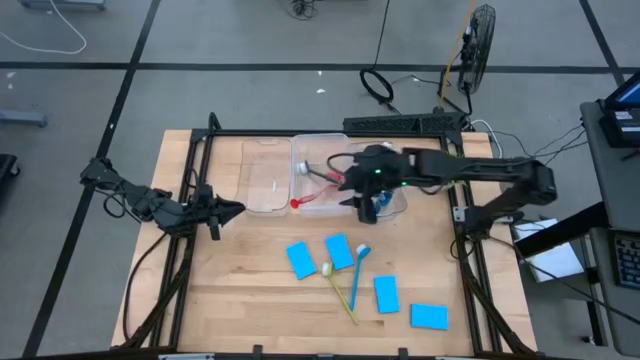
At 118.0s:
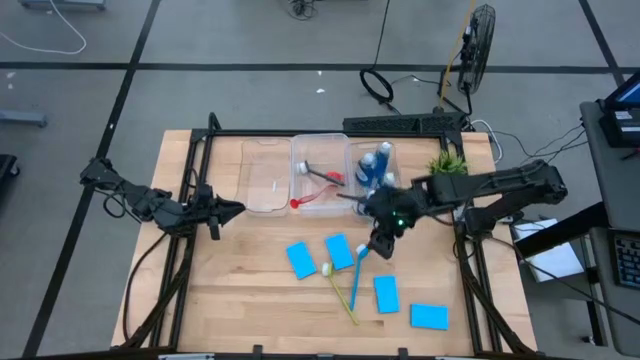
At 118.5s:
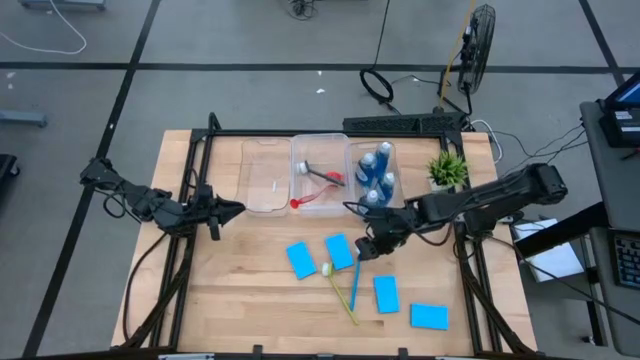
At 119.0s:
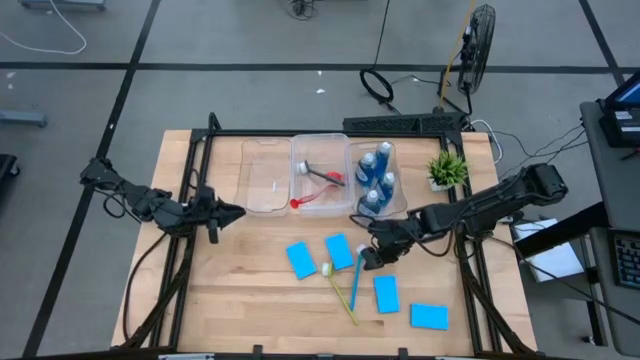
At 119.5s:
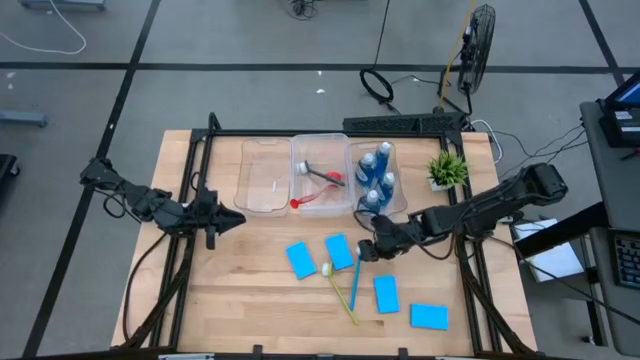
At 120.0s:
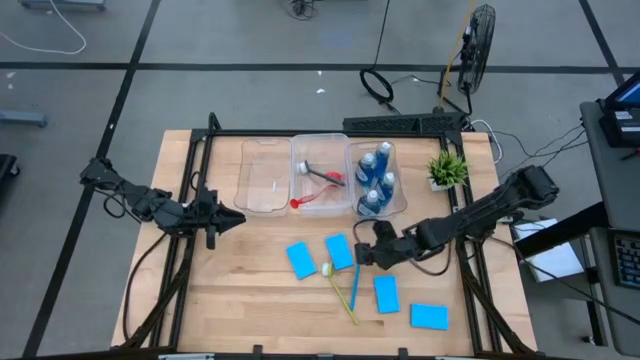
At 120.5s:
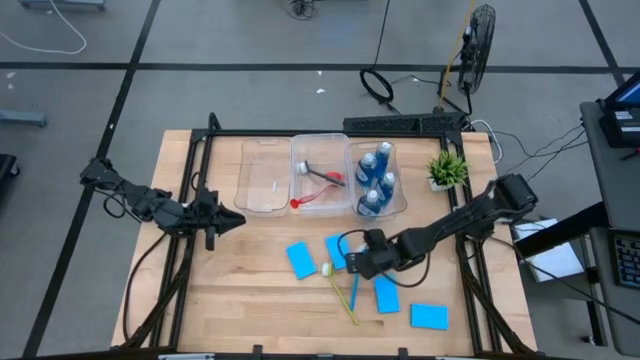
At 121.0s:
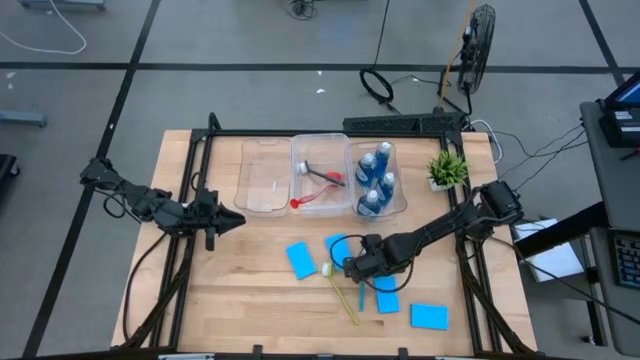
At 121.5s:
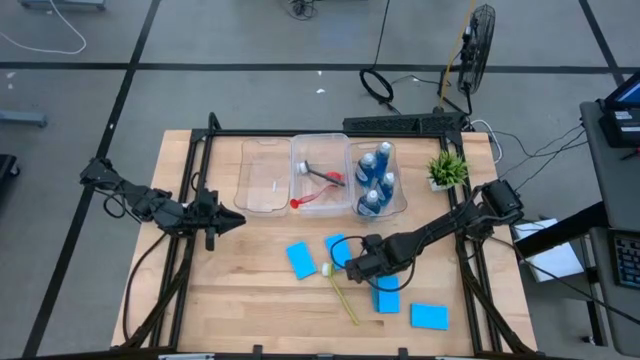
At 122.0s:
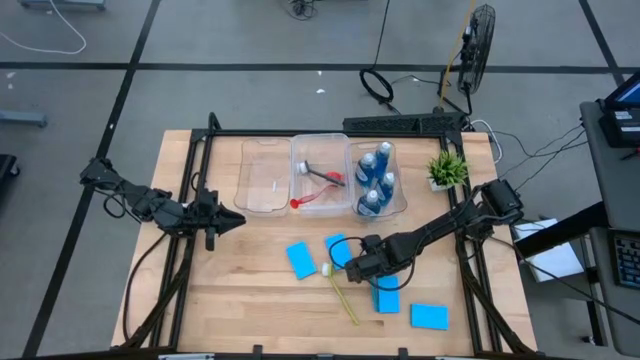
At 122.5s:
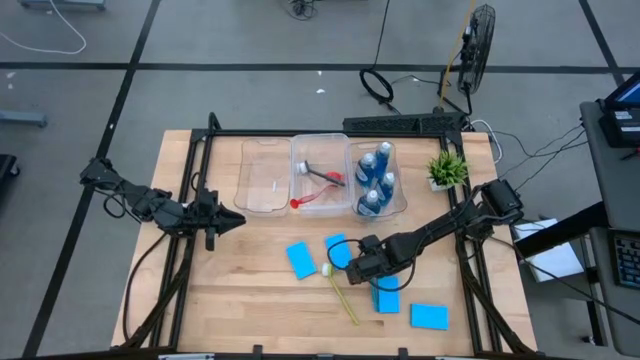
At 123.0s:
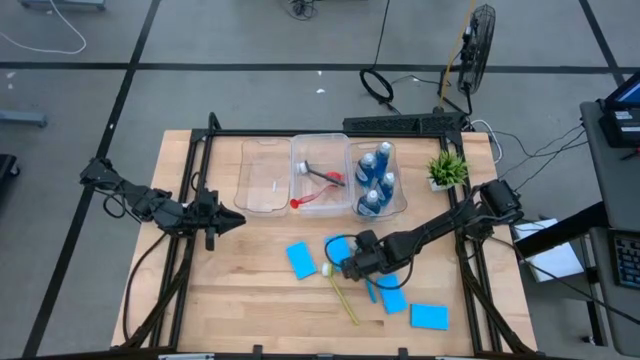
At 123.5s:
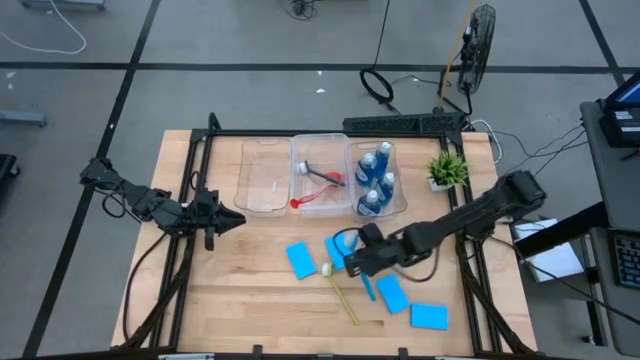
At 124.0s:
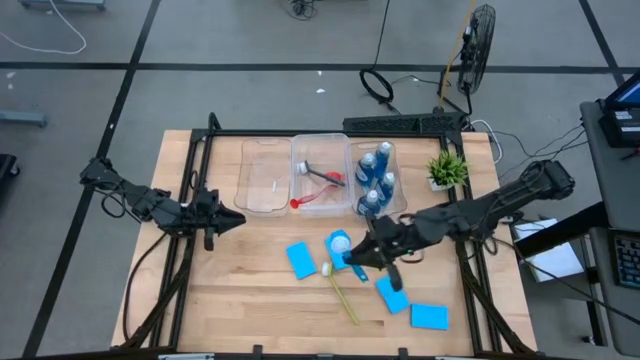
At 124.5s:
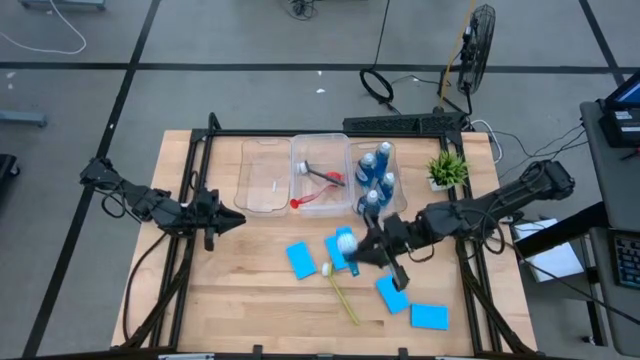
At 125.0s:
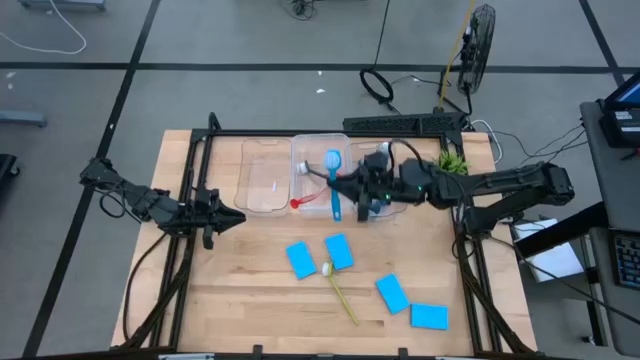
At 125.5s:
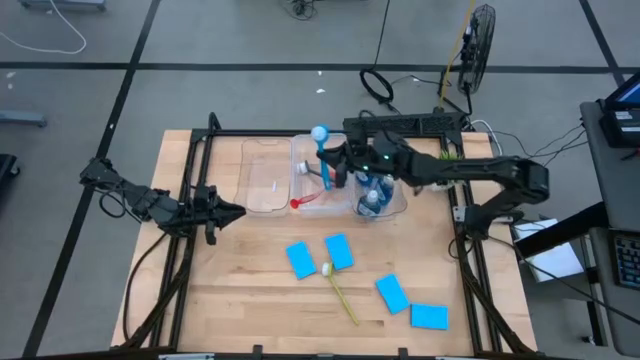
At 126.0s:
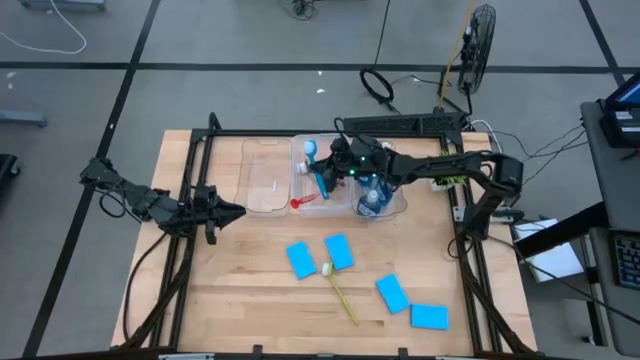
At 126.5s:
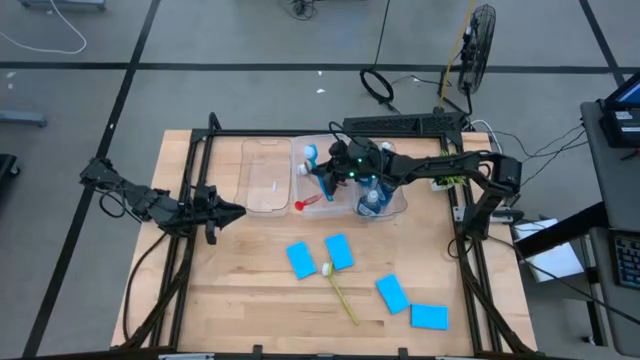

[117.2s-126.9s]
Task: Pick & Place Kitchen Sink Supplies
Put the blue dishwashing brush into the white bin

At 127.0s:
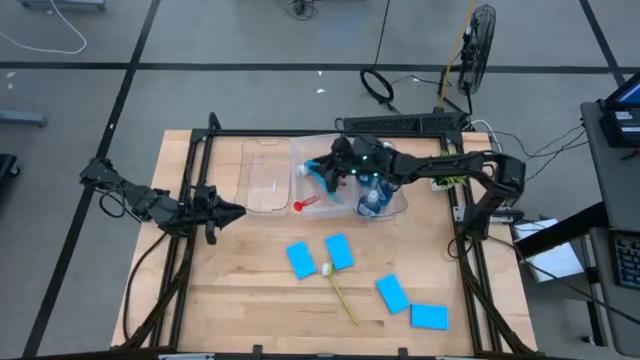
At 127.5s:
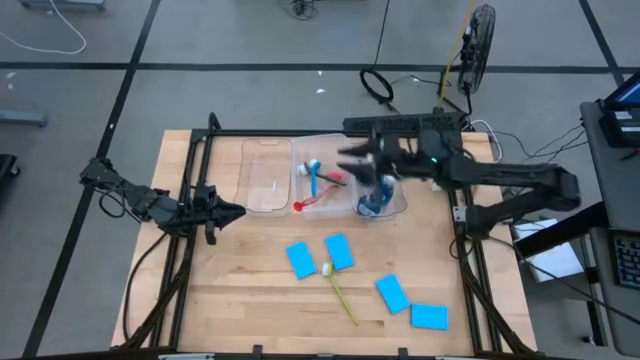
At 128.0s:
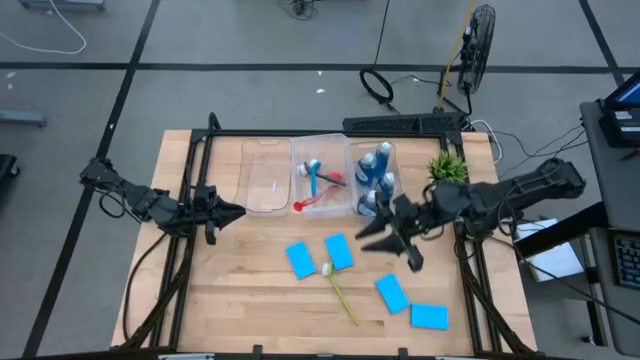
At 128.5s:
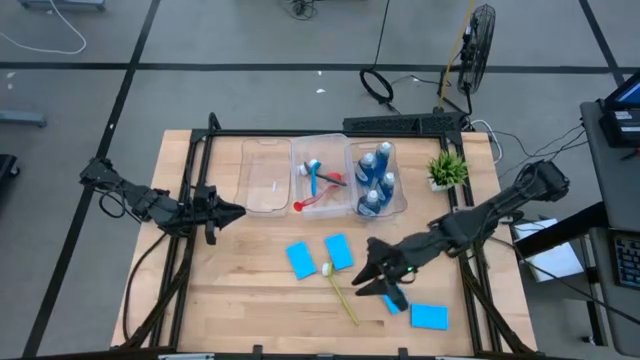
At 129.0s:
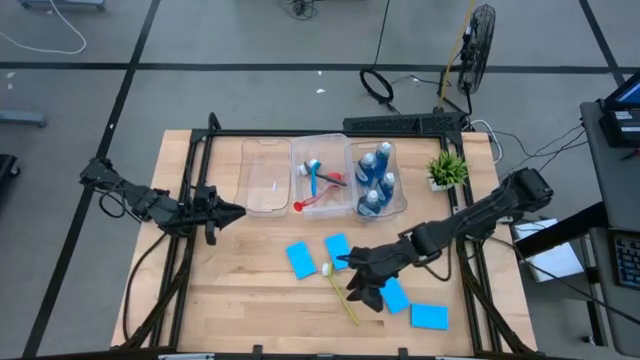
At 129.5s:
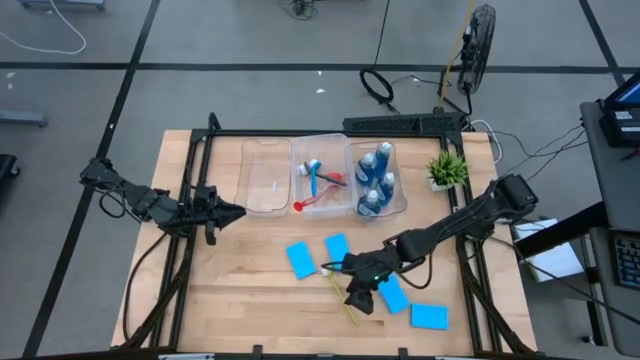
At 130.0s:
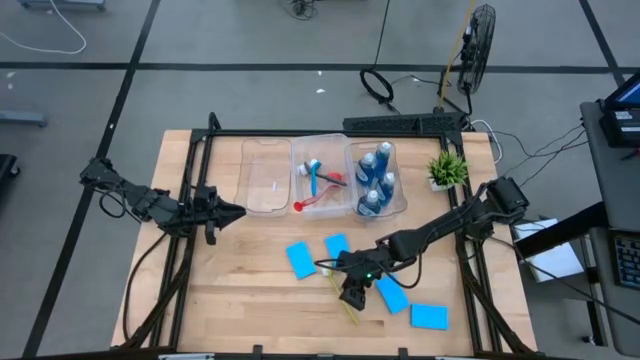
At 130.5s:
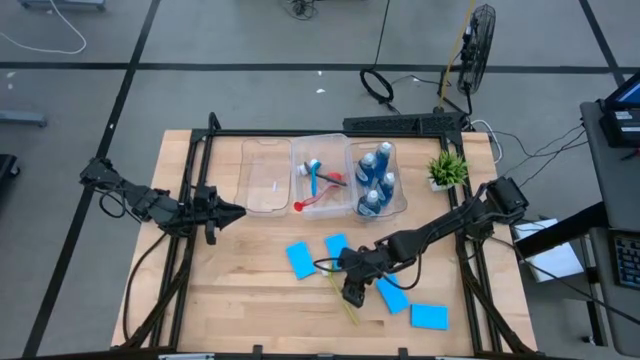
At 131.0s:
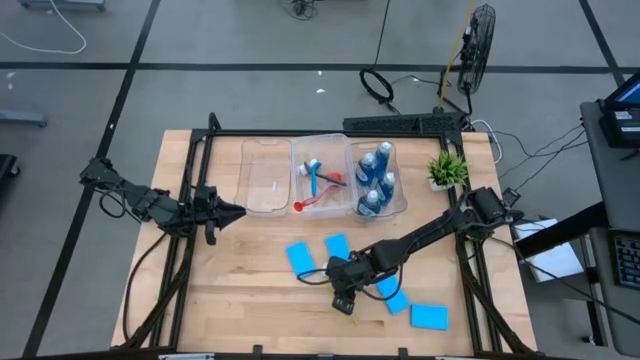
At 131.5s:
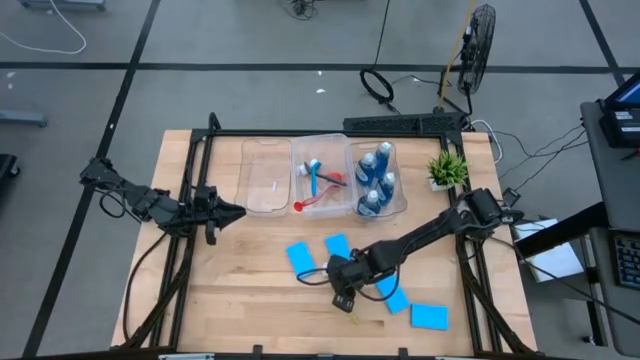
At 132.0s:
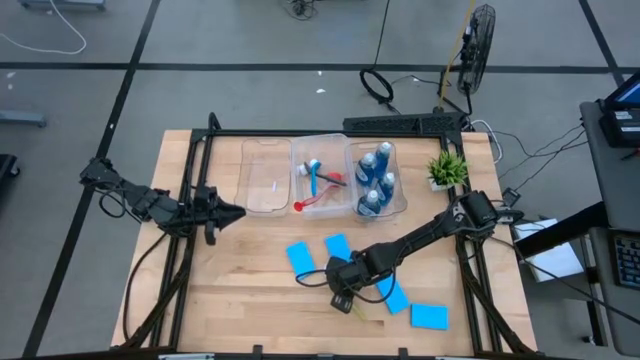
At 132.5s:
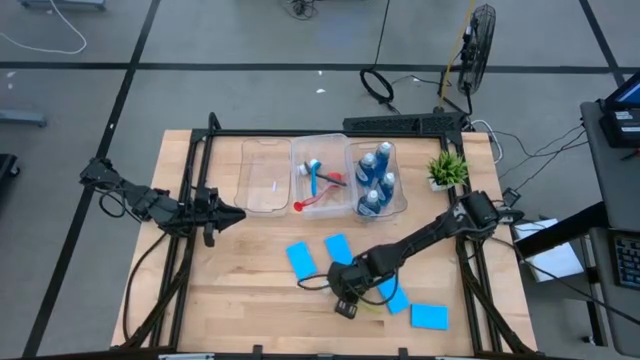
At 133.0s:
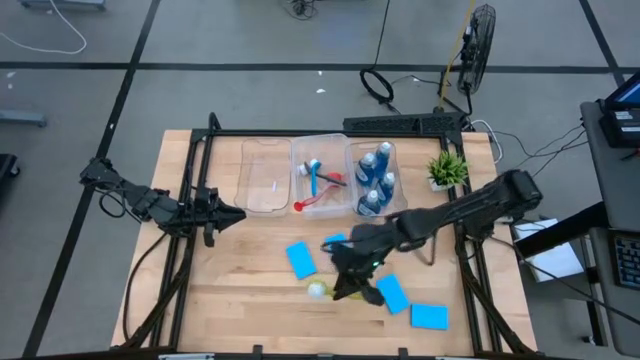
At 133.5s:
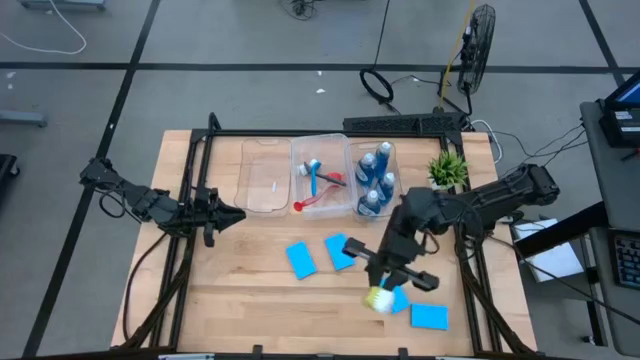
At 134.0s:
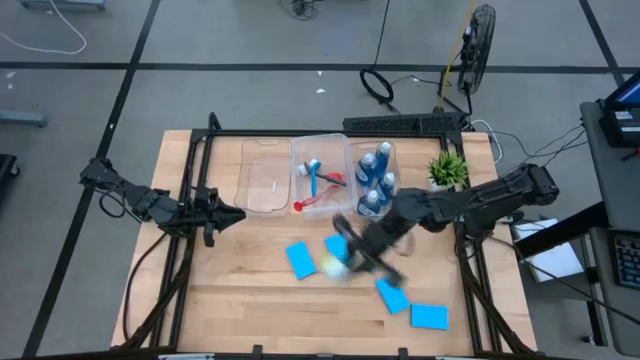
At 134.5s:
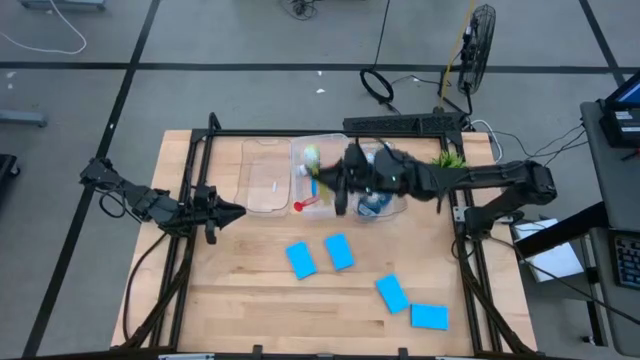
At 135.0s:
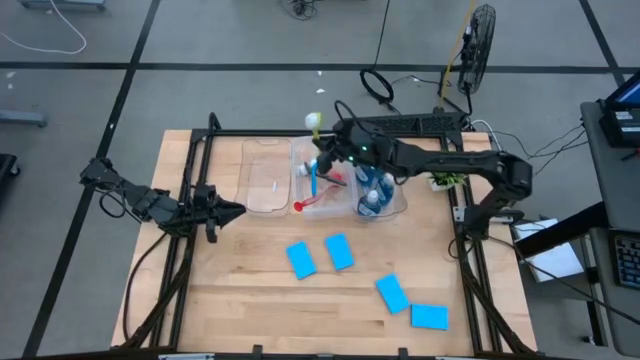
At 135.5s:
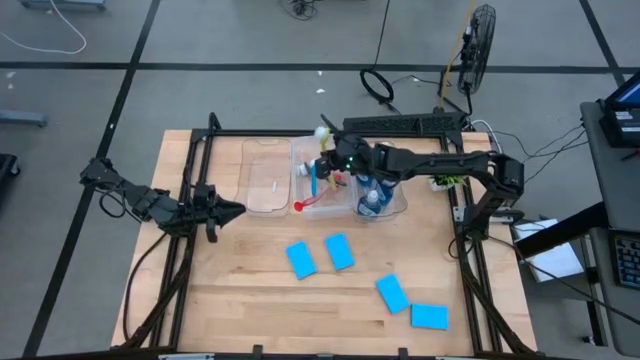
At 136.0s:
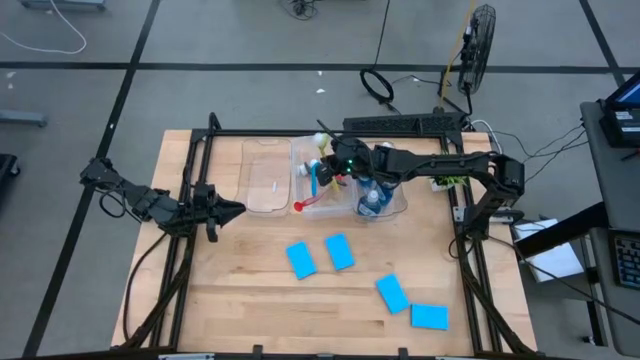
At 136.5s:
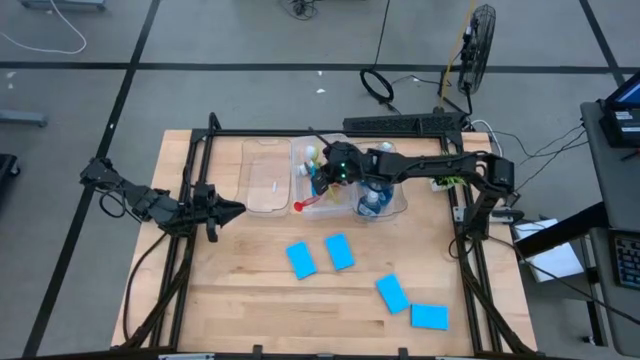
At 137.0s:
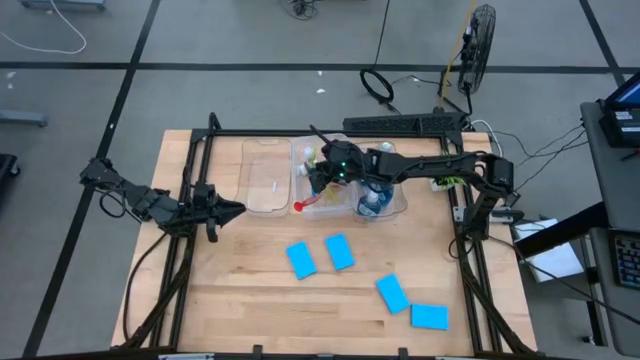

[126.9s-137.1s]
Put the green dishwashing brush into the white bin

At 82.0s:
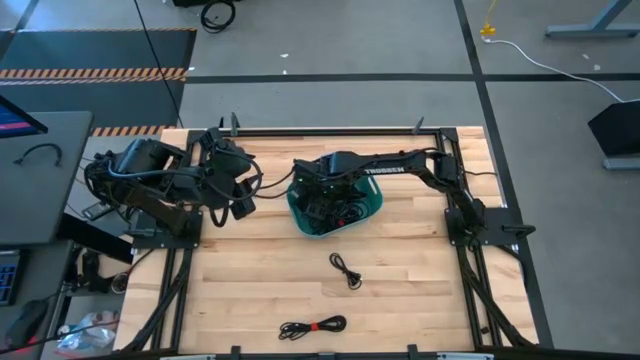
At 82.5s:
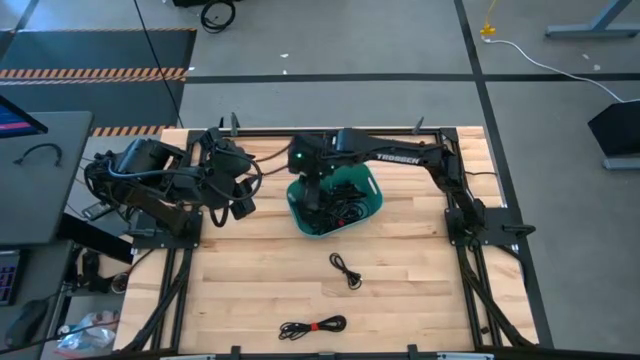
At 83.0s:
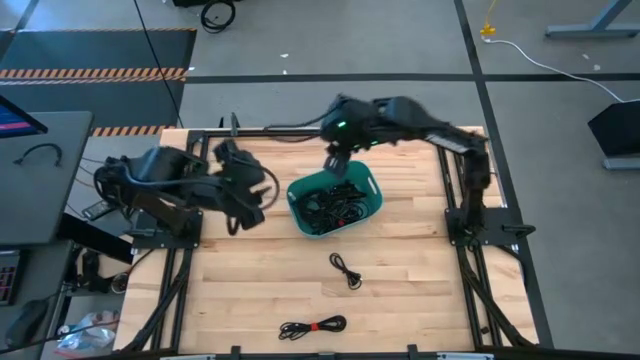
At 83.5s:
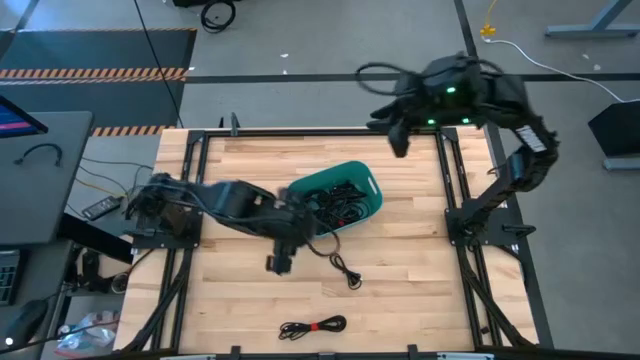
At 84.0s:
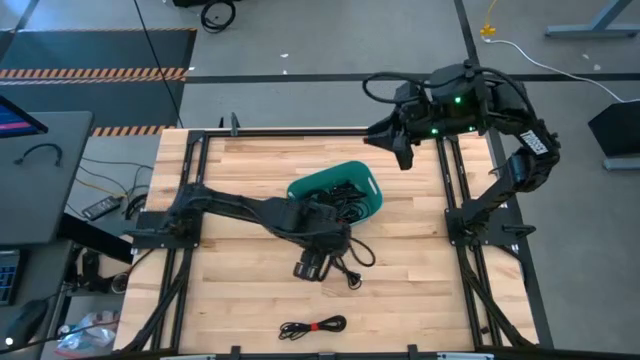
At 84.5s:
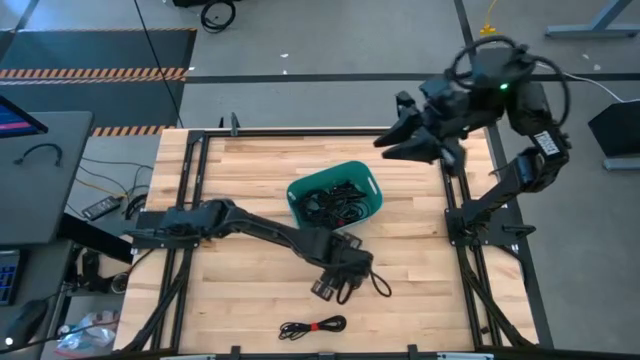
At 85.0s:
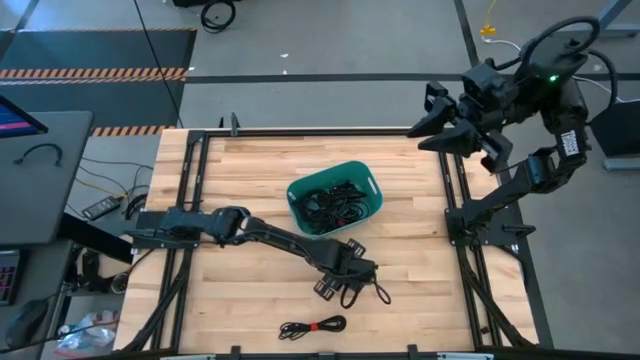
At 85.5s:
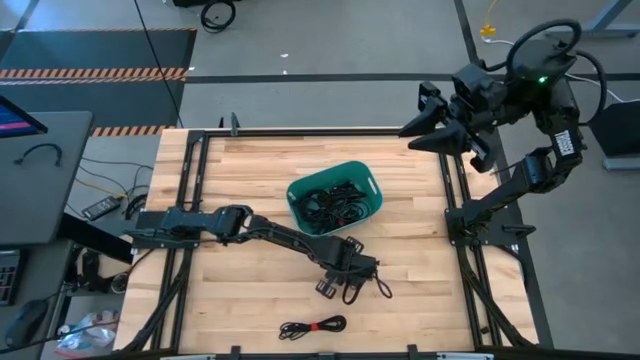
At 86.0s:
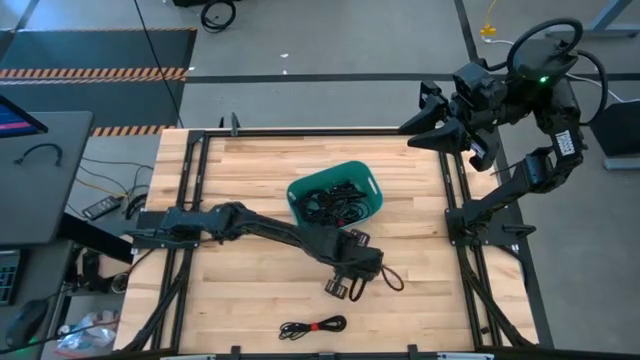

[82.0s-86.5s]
Task: Pick and place USB-C Cables
Put the black charger cable into the green bin
